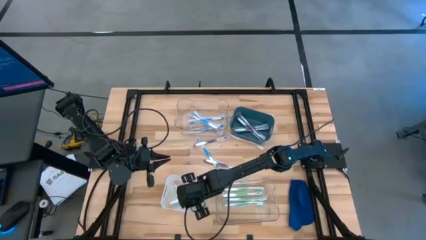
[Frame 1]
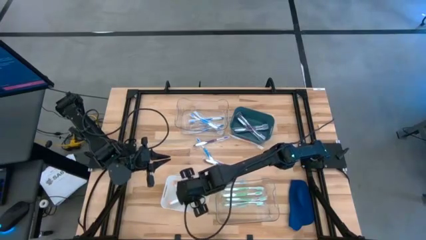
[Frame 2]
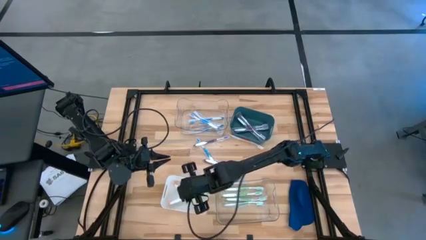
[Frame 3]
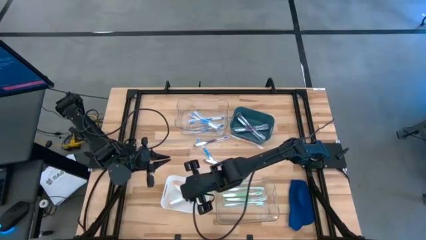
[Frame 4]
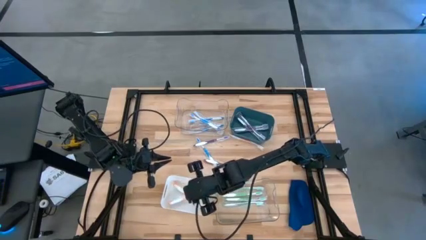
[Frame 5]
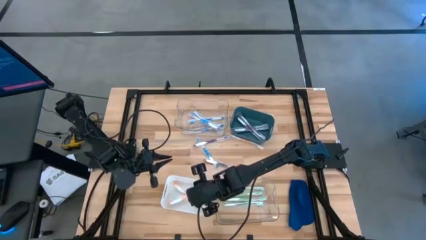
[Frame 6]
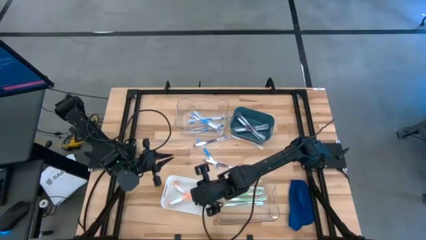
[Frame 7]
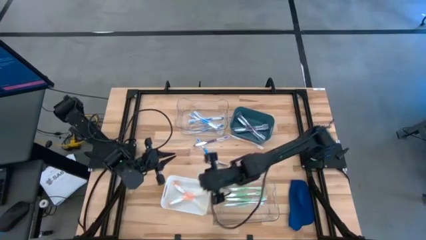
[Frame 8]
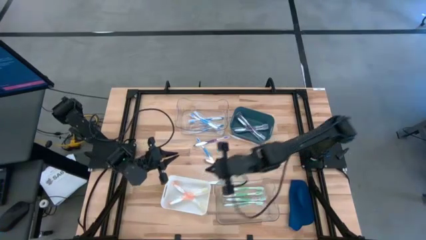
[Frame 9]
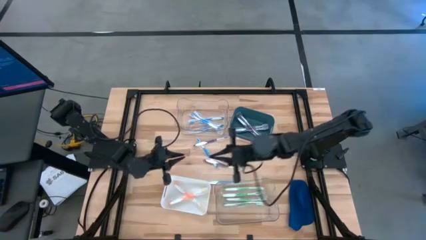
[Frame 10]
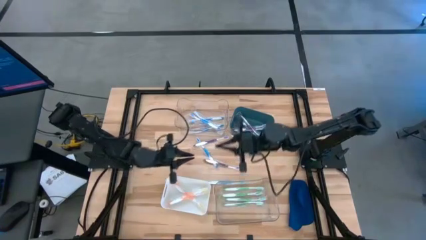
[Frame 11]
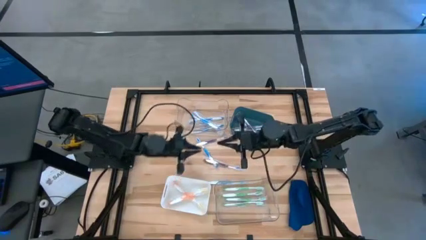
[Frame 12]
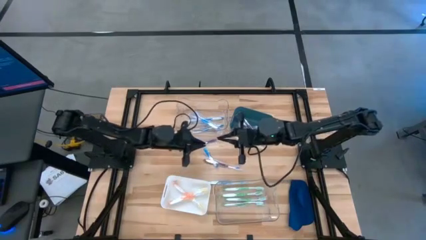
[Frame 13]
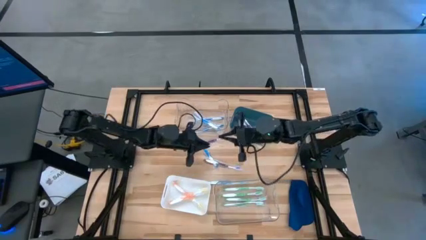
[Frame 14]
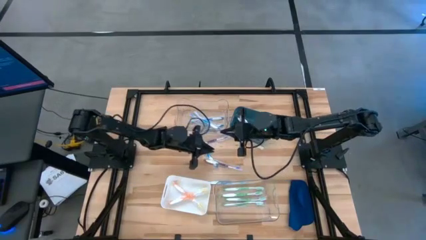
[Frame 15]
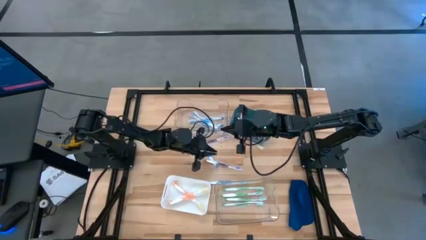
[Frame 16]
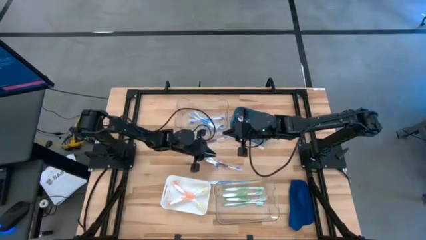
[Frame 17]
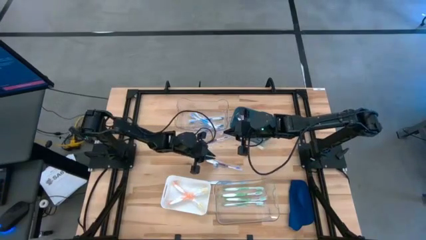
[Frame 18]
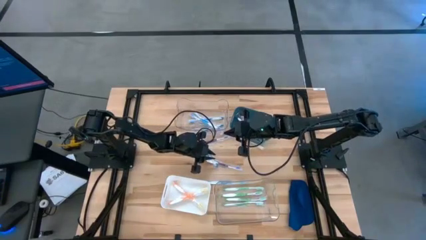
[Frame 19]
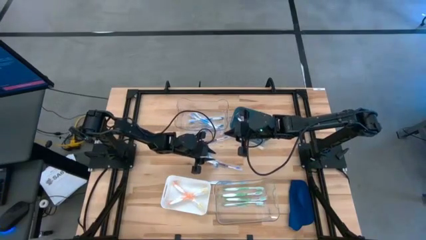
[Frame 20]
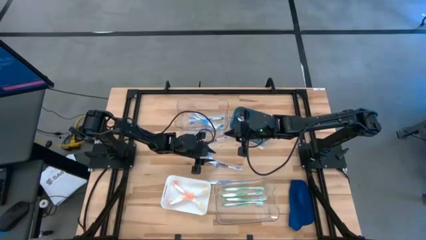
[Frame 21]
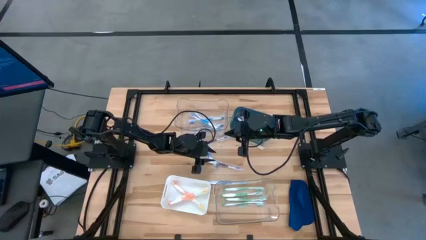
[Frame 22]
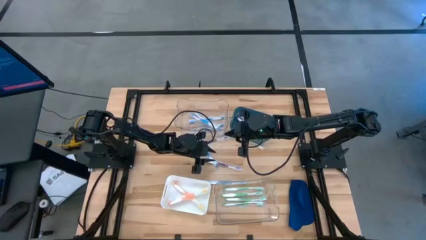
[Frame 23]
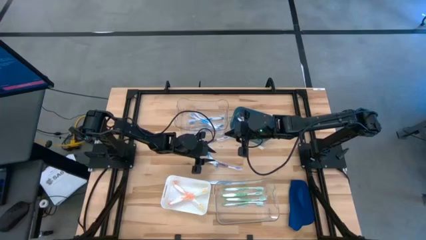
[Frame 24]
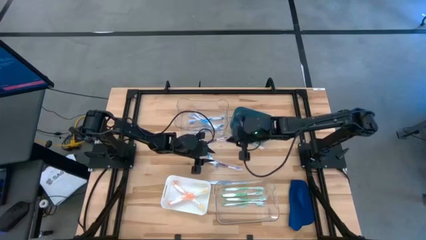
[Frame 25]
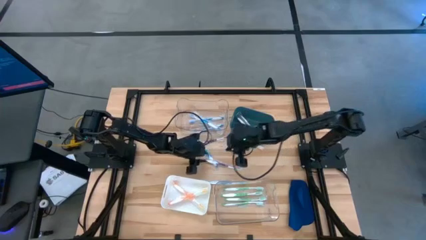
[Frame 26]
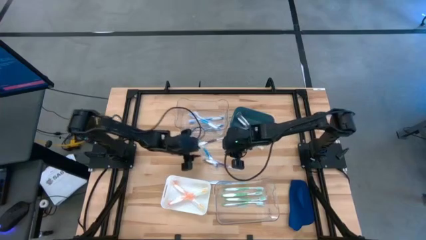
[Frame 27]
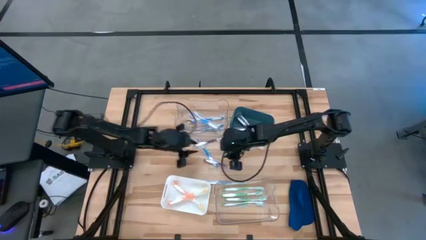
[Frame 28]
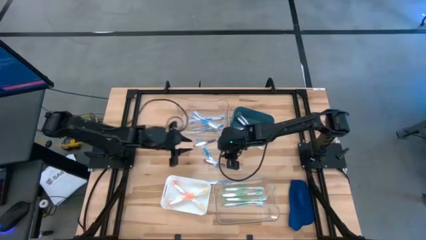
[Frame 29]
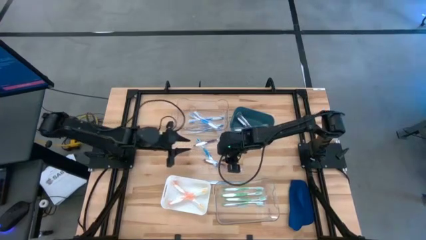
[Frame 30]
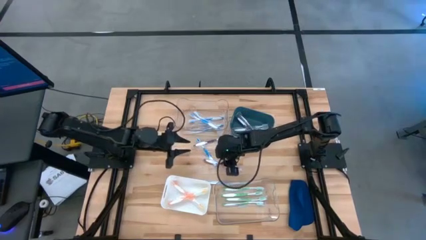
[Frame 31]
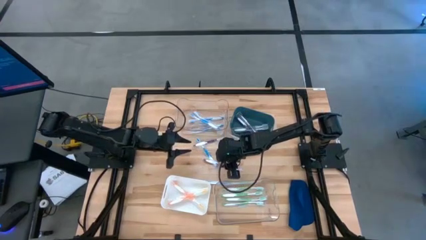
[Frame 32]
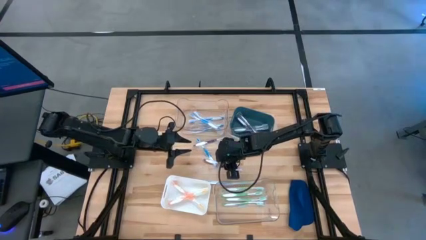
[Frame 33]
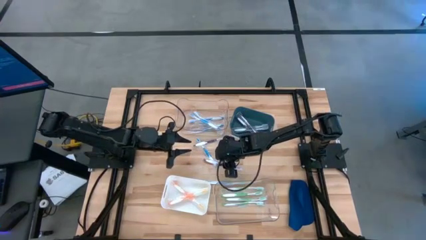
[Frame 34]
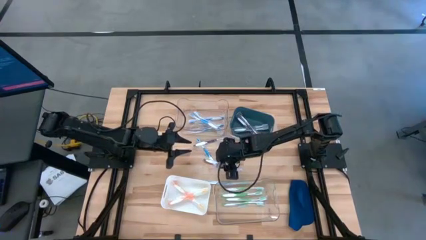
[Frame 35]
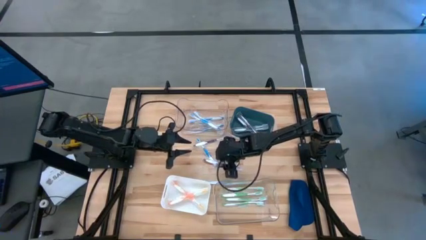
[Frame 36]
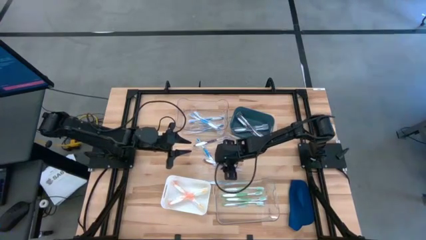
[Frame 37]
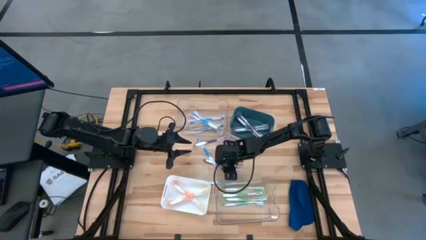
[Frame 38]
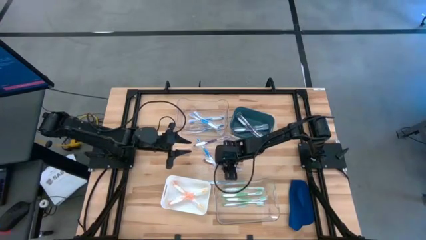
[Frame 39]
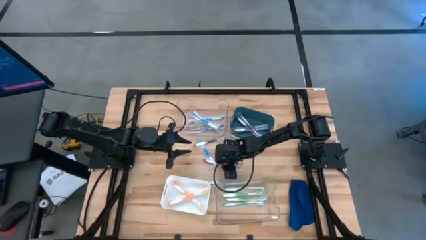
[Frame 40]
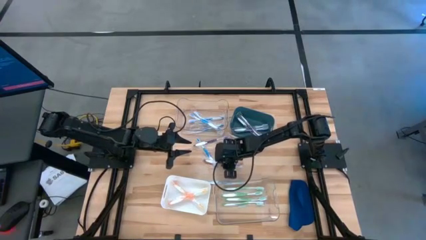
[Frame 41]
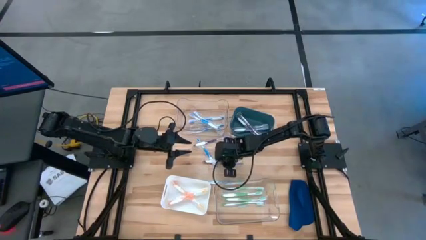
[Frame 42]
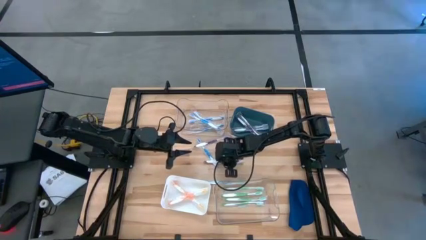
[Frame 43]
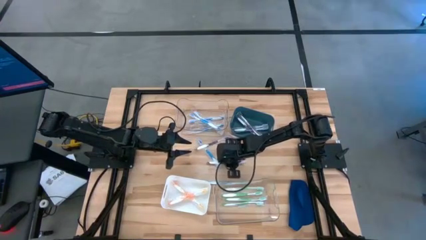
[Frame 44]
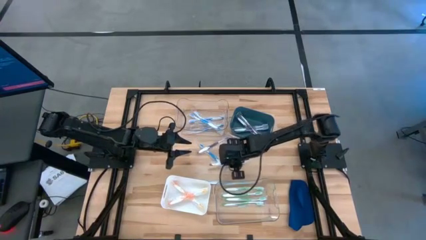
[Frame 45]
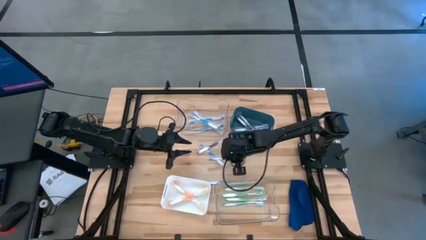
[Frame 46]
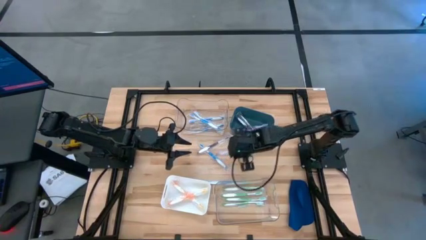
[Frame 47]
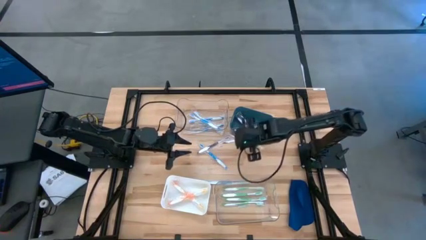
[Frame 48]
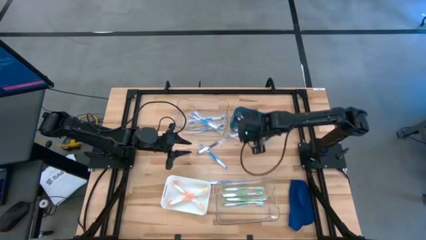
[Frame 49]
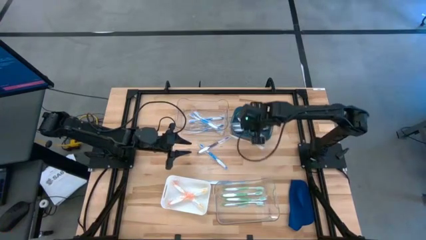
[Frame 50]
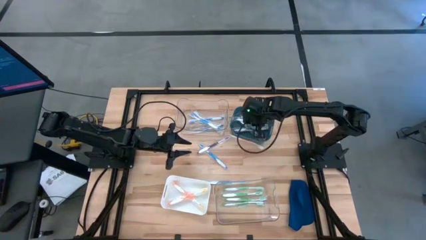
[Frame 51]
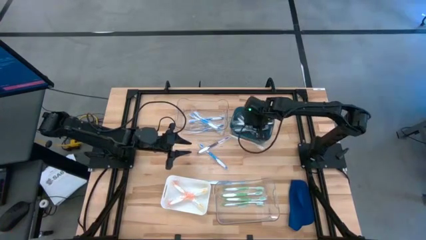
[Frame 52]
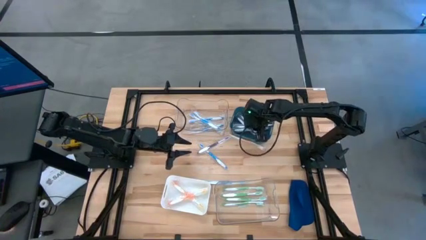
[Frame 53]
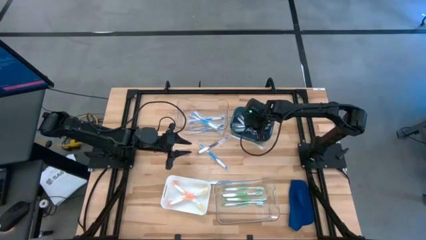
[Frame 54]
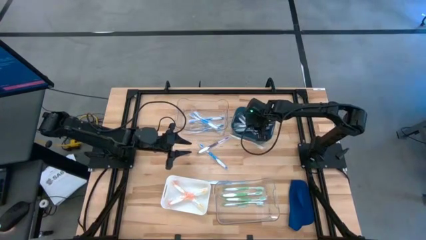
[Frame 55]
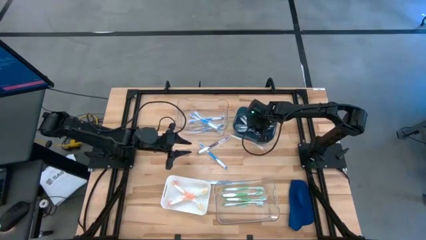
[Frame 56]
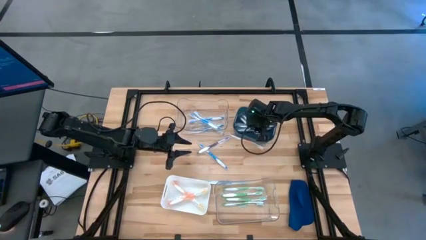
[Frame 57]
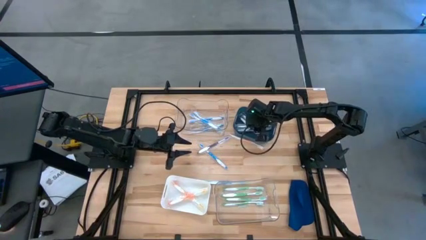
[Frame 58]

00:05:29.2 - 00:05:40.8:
Task: Pick & Place Toothbrushes
Put the purple toothbrush into the green bin
